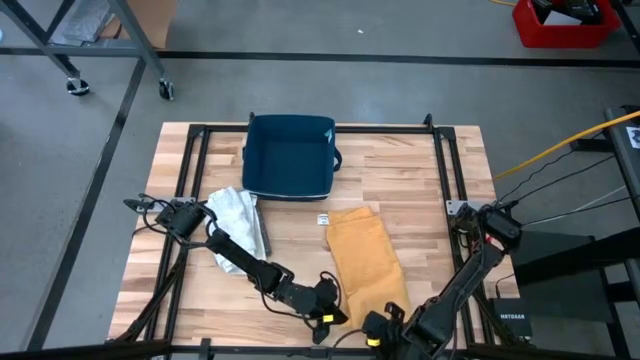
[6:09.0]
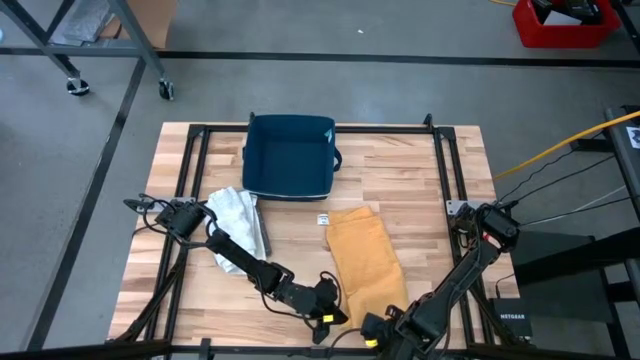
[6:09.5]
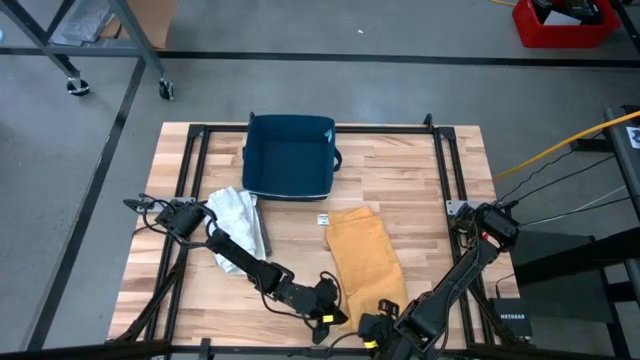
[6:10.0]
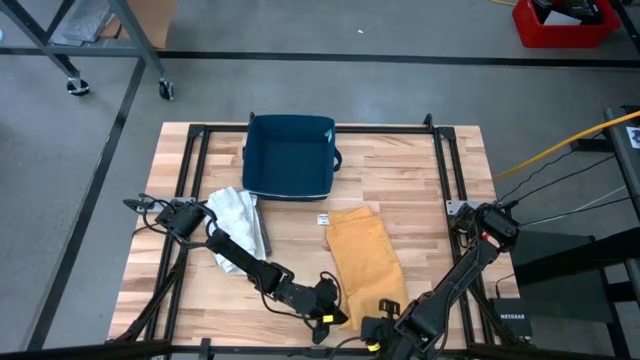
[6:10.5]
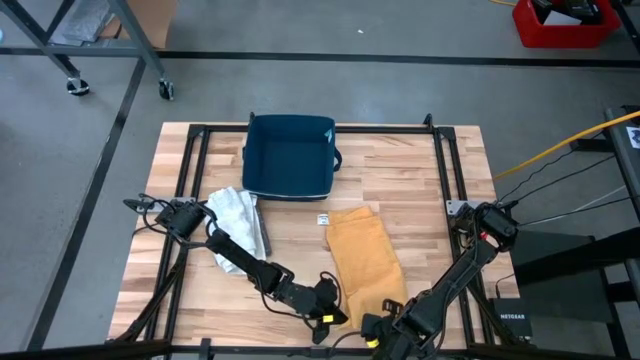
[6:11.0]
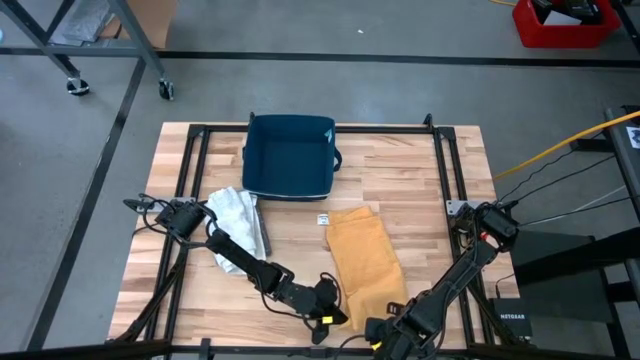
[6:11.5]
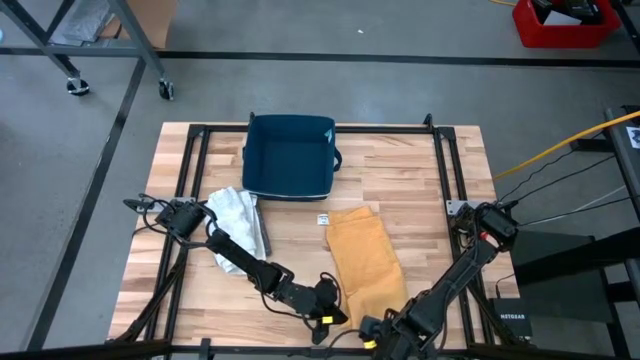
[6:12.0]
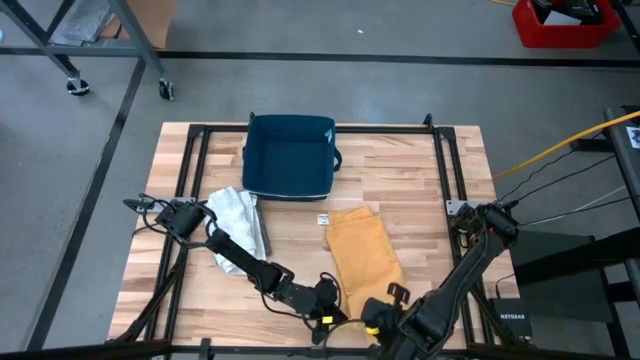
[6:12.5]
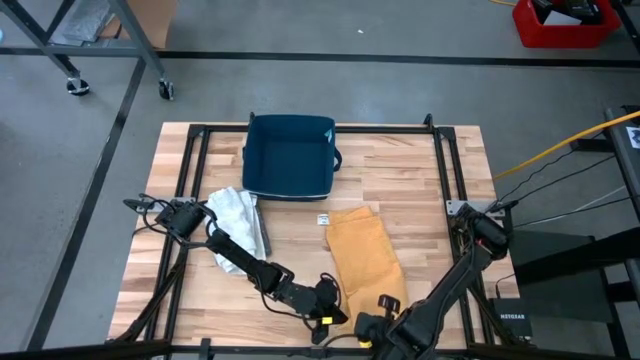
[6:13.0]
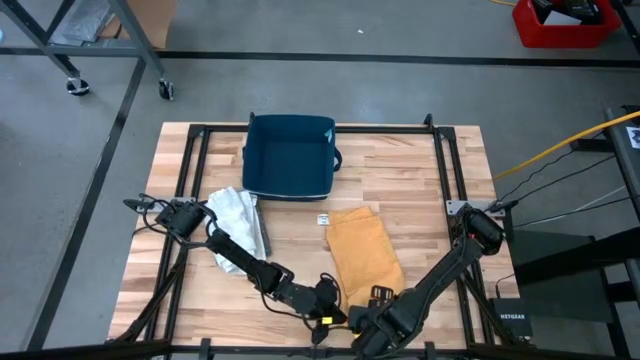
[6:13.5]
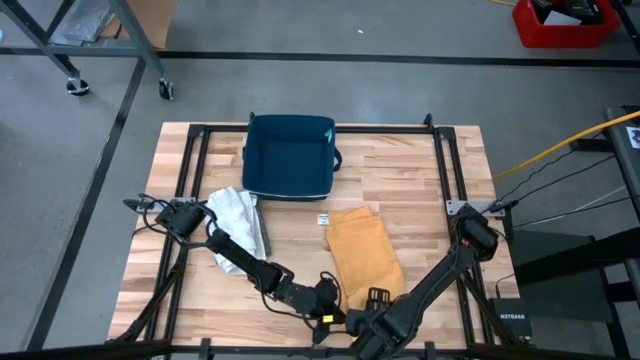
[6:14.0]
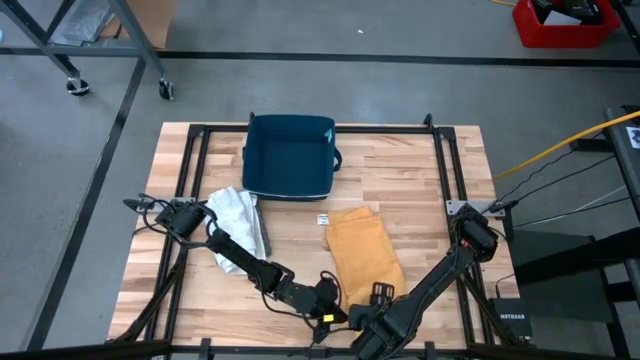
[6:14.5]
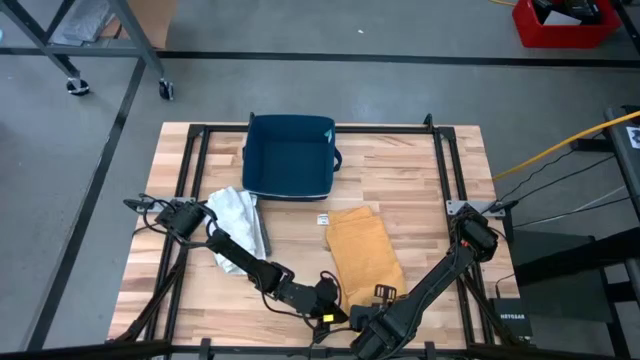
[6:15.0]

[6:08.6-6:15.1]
Task: Fold towel
Fold the yellow towel

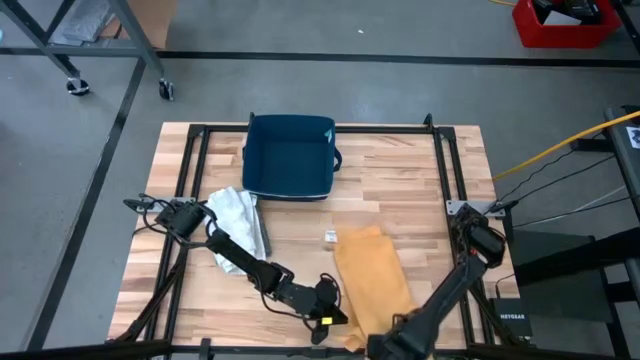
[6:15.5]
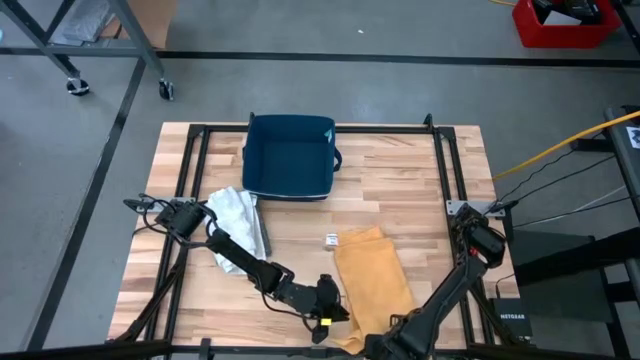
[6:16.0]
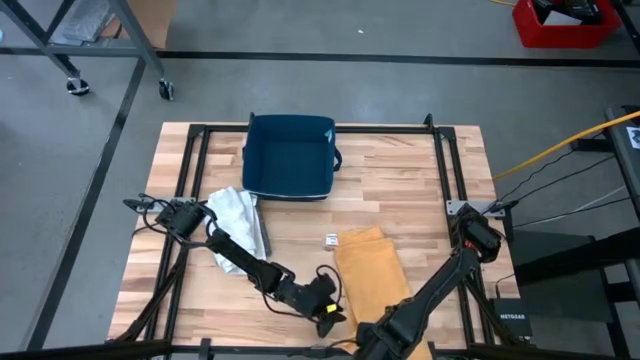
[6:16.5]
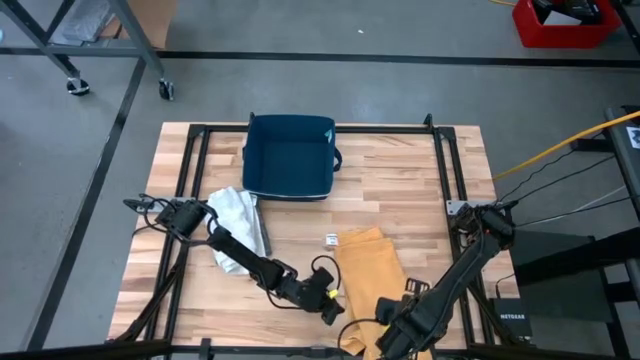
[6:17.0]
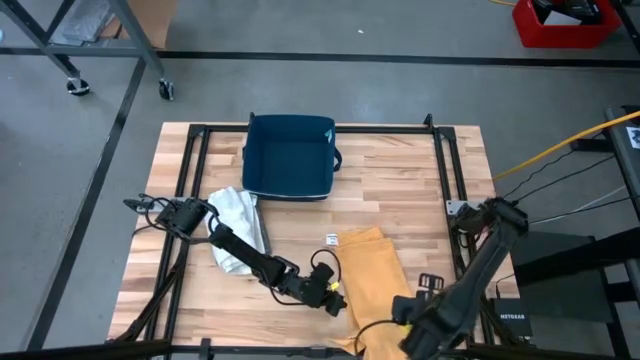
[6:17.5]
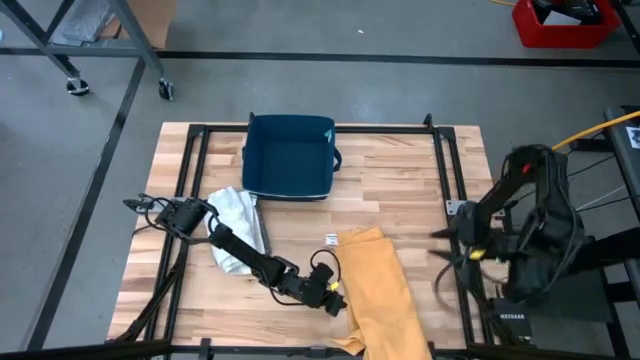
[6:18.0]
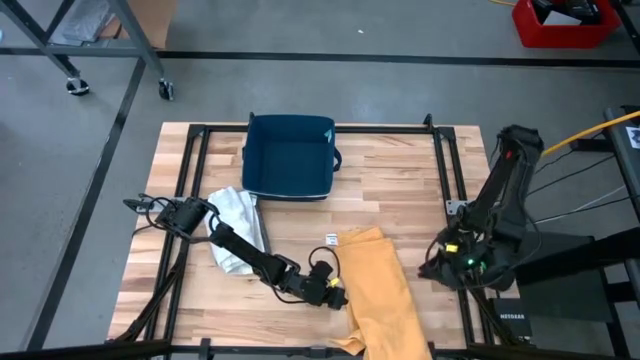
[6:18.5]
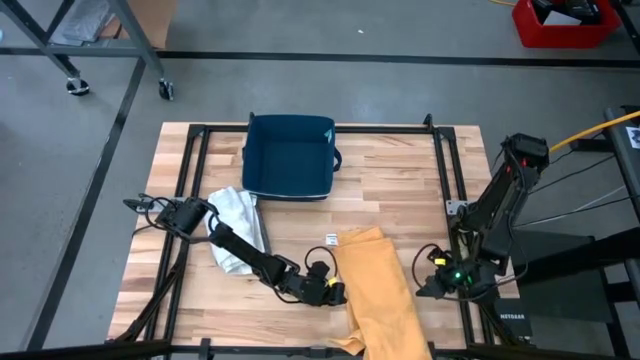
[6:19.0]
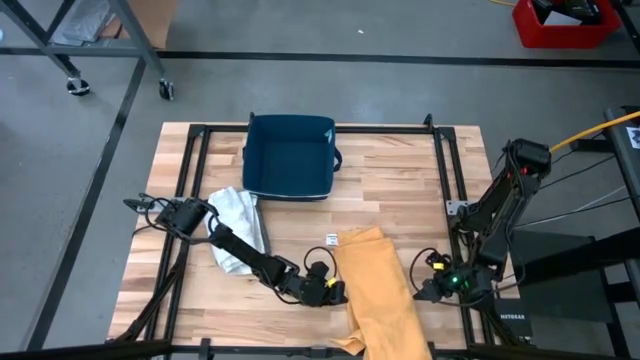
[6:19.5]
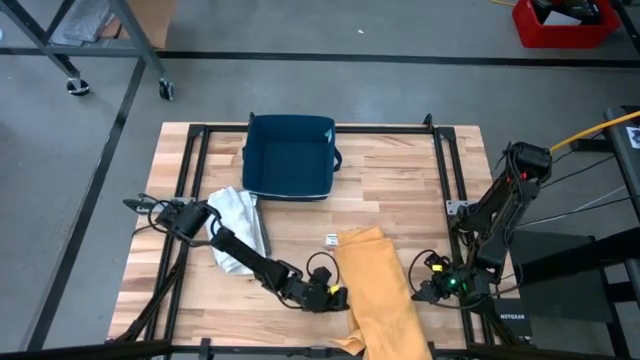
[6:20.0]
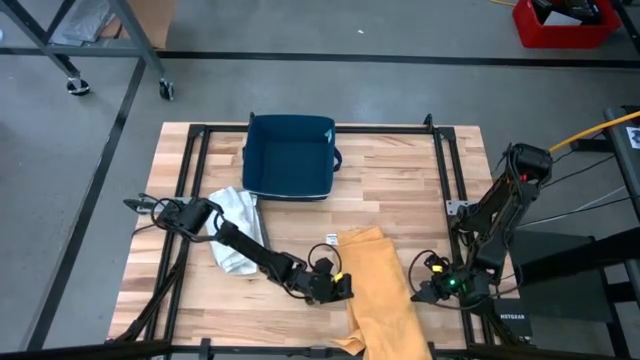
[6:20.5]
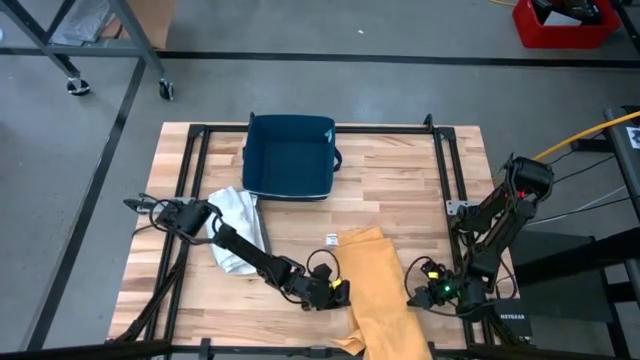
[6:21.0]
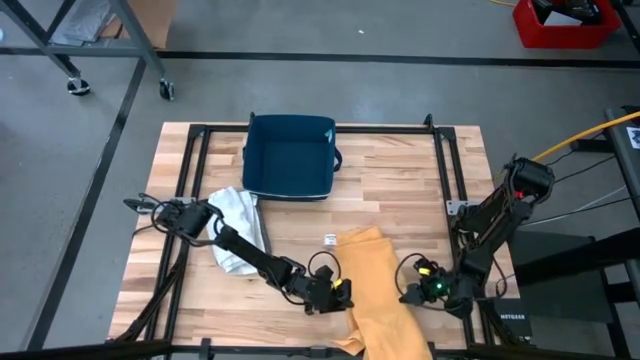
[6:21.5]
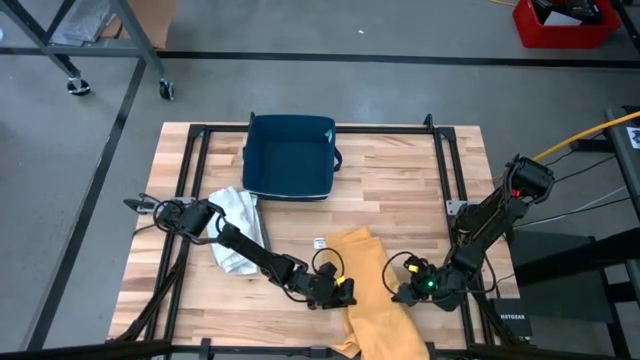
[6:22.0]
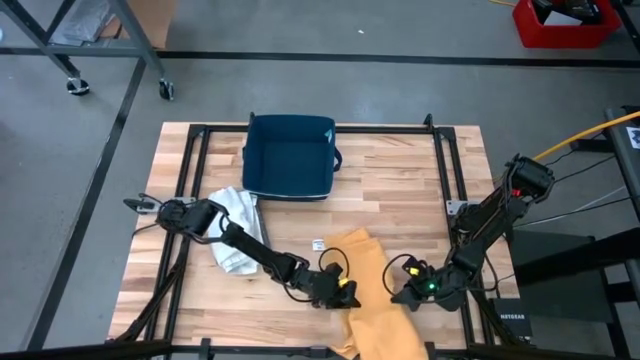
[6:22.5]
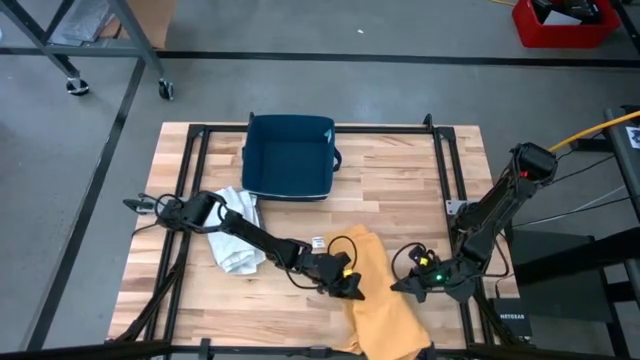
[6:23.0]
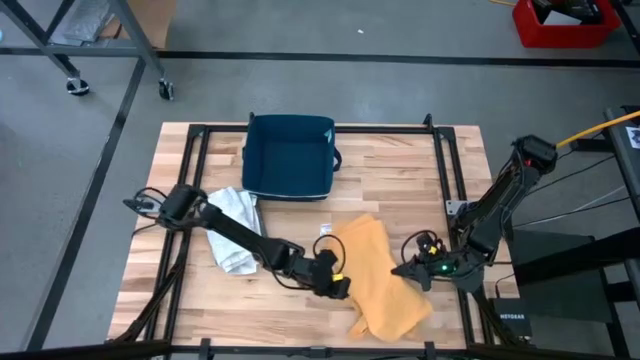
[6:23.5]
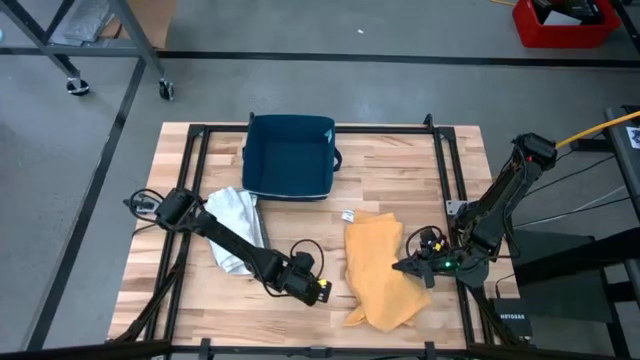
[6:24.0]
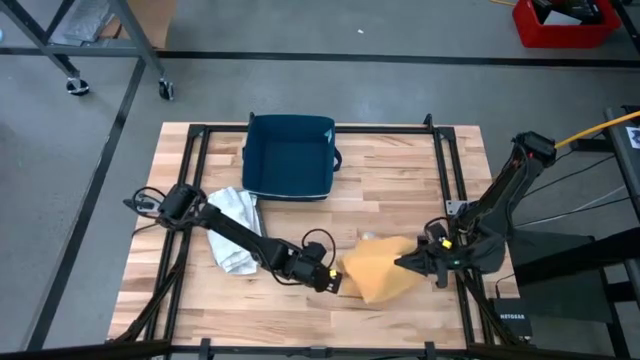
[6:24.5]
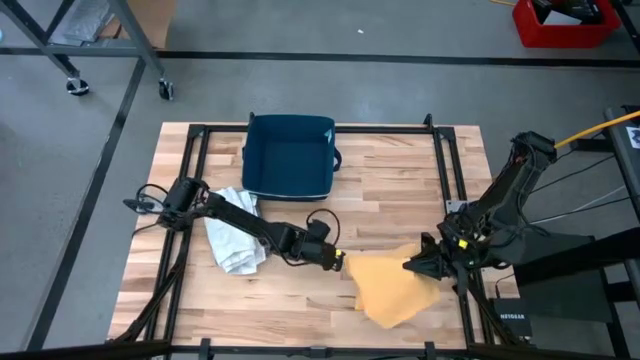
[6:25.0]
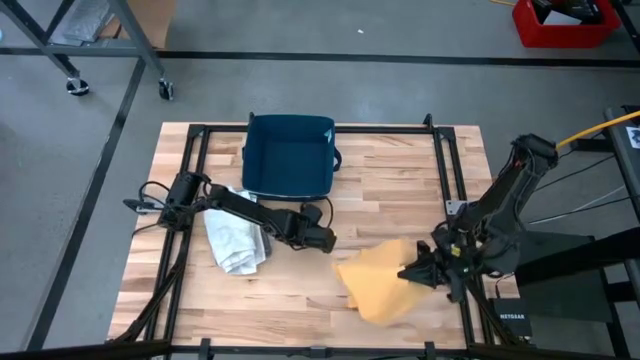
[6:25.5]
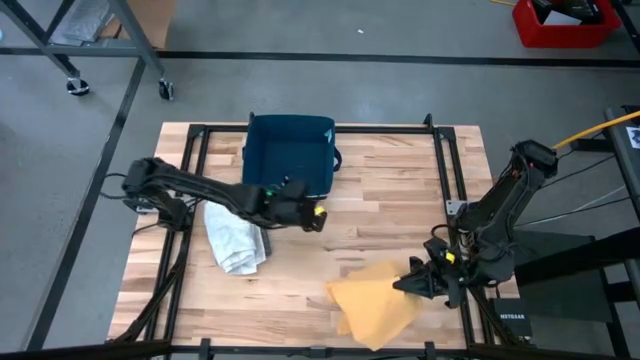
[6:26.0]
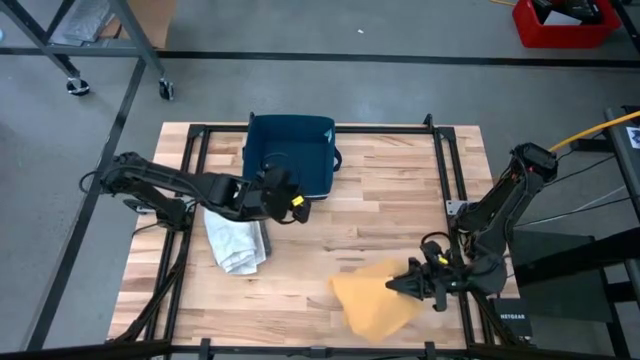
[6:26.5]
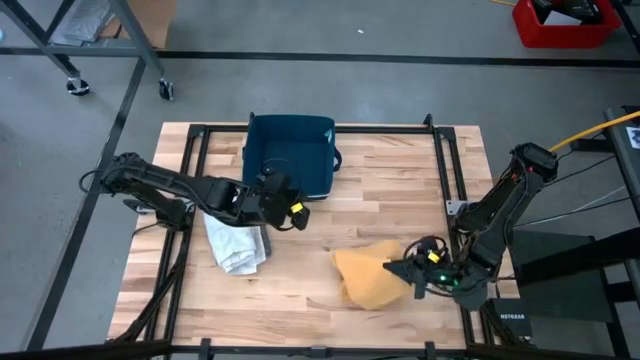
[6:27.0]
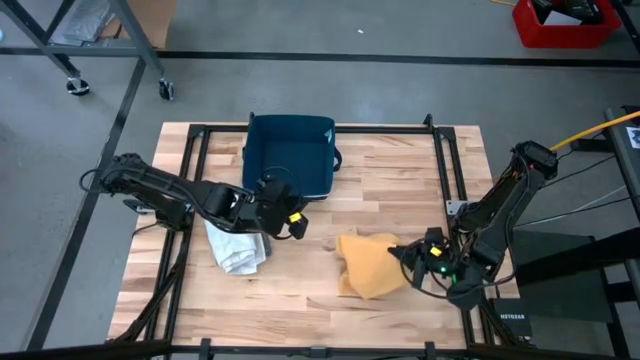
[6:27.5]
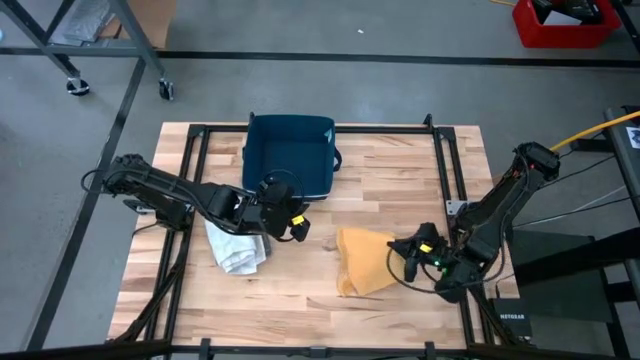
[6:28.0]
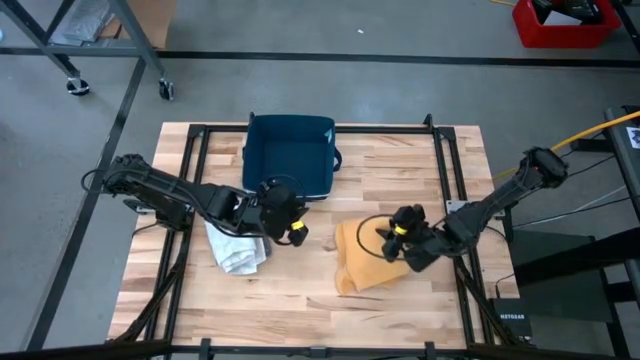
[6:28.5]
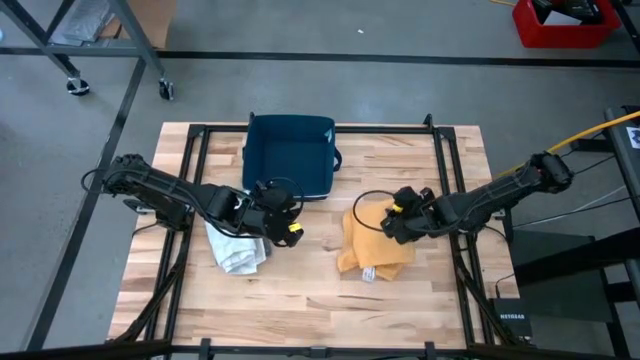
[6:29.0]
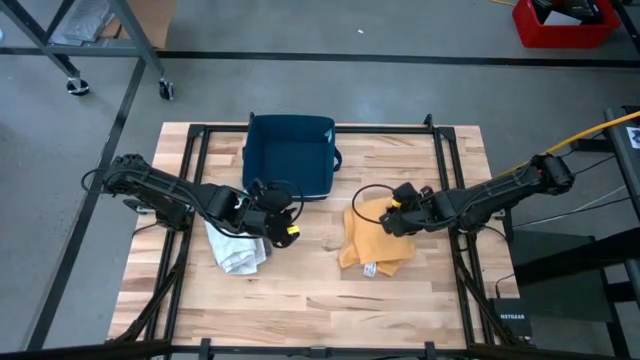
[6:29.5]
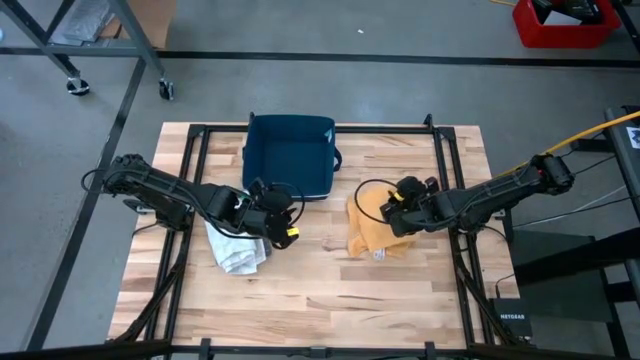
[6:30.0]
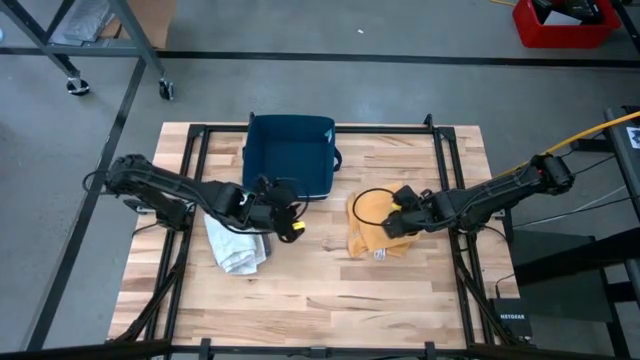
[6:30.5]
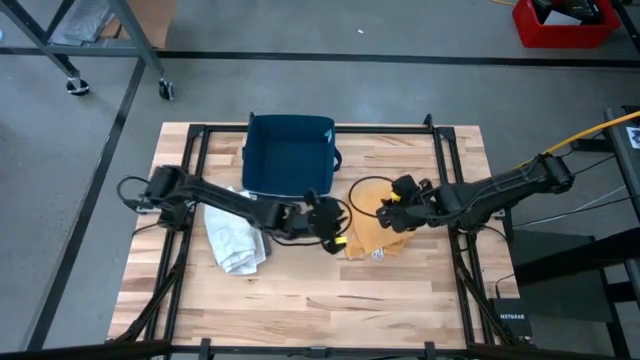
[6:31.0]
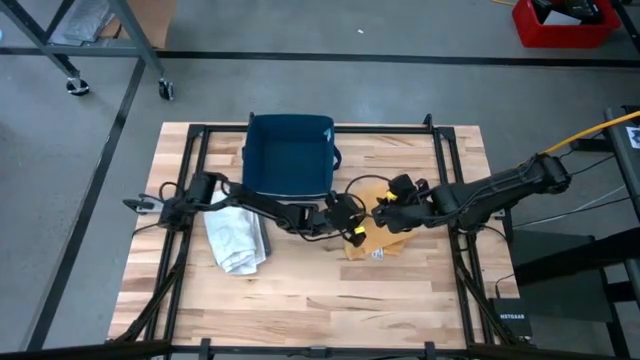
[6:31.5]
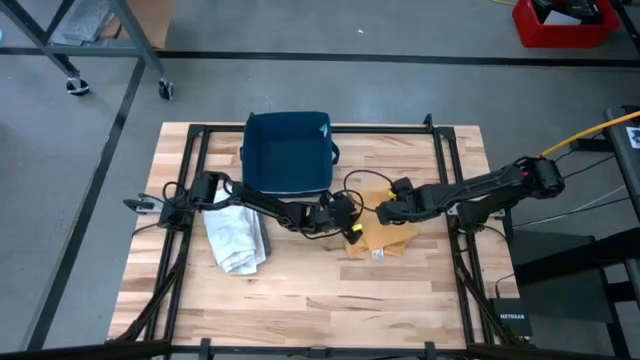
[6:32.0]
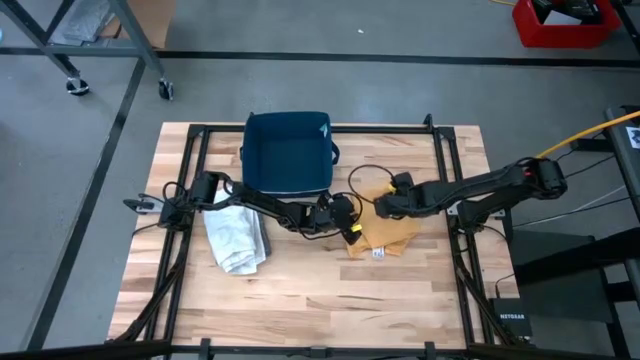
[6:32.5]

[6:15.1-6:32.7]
Fold the yellow towel
